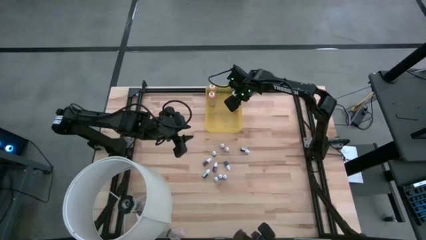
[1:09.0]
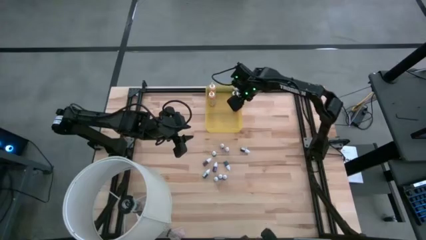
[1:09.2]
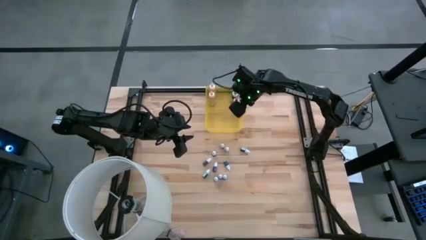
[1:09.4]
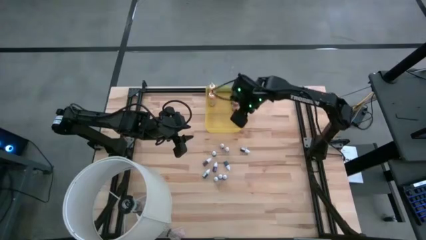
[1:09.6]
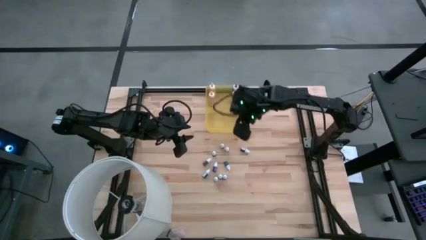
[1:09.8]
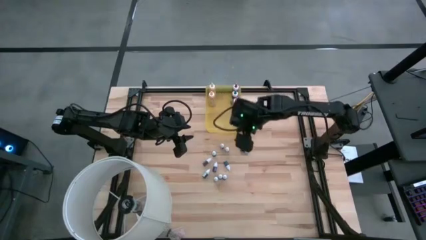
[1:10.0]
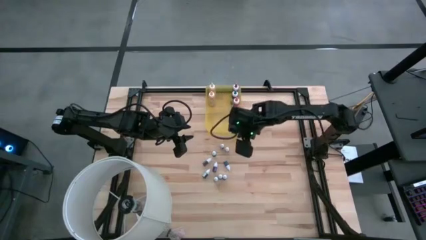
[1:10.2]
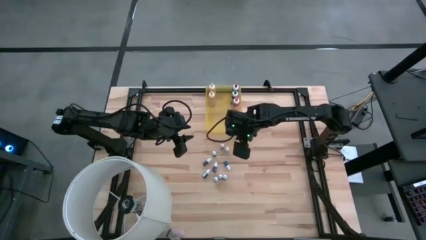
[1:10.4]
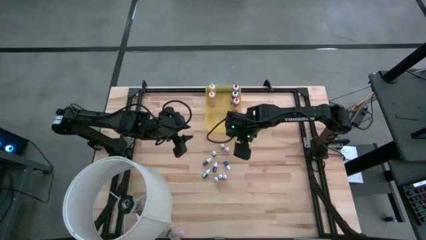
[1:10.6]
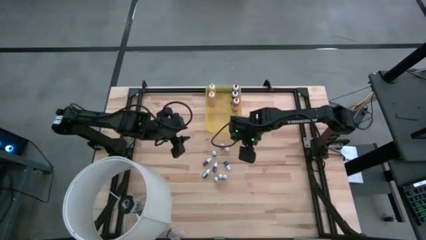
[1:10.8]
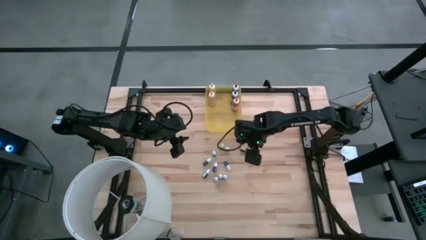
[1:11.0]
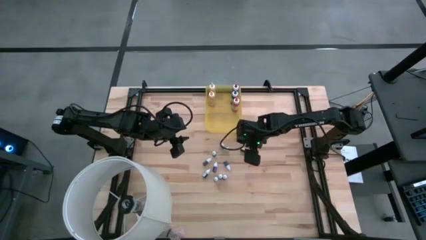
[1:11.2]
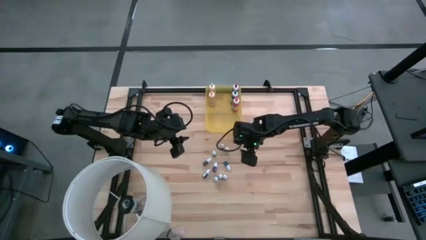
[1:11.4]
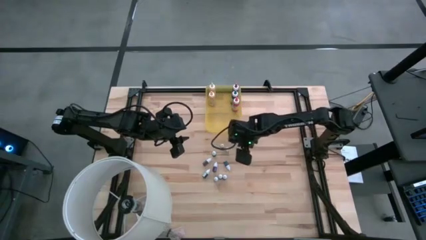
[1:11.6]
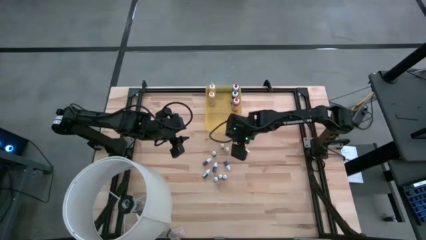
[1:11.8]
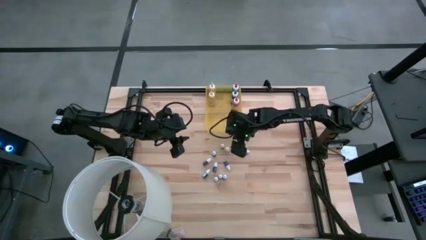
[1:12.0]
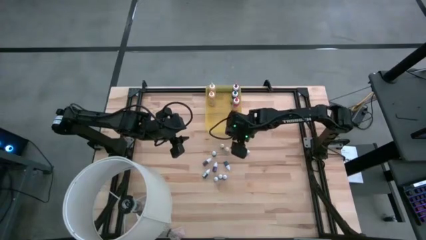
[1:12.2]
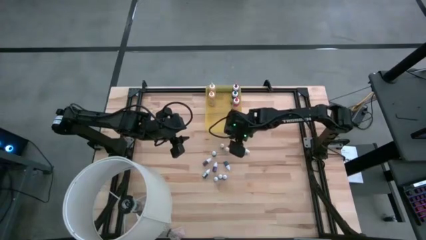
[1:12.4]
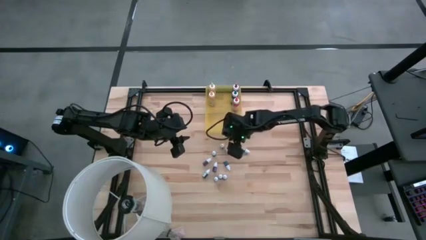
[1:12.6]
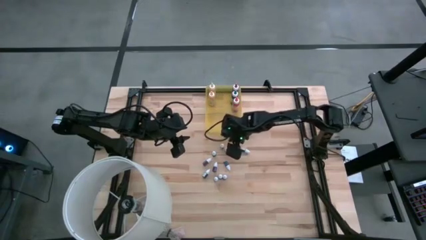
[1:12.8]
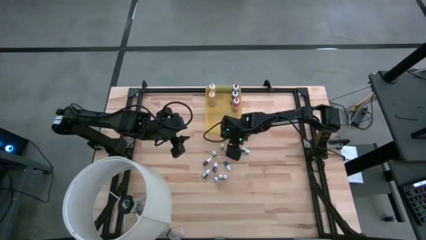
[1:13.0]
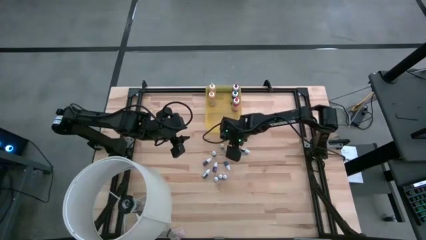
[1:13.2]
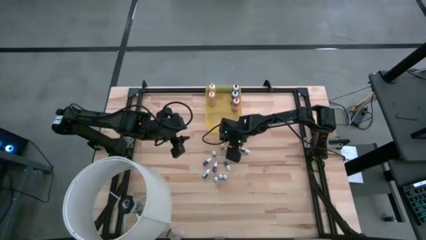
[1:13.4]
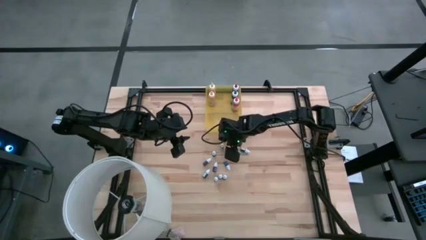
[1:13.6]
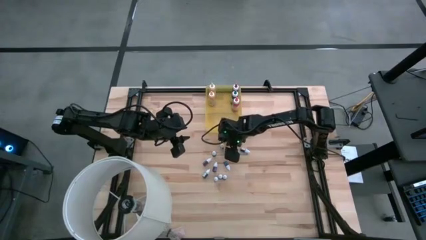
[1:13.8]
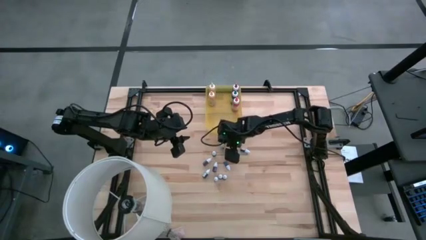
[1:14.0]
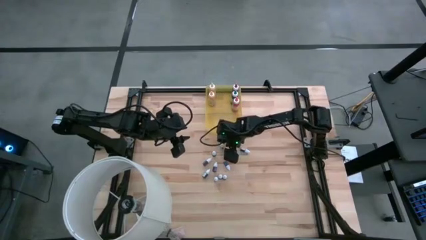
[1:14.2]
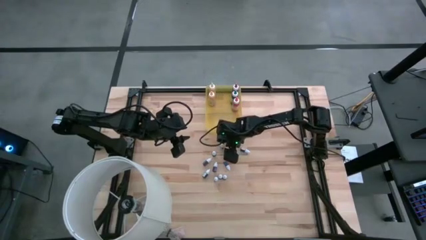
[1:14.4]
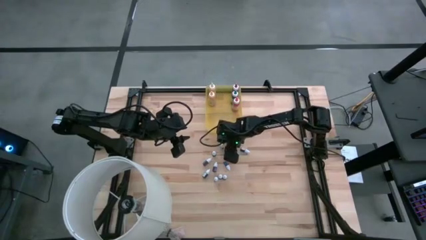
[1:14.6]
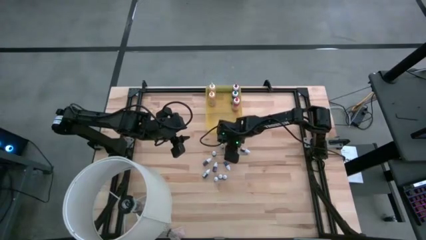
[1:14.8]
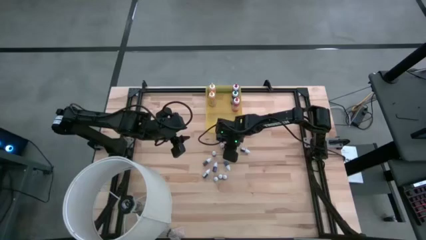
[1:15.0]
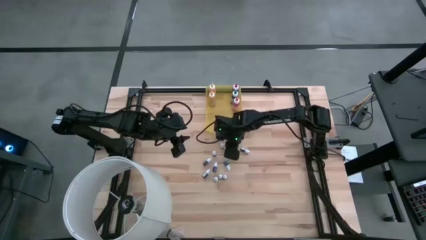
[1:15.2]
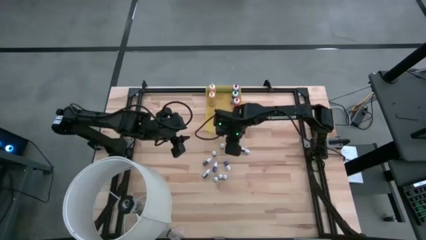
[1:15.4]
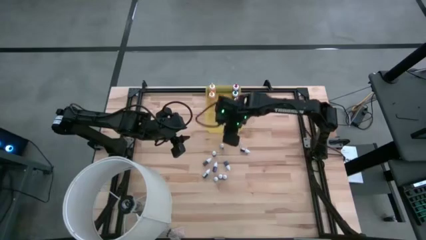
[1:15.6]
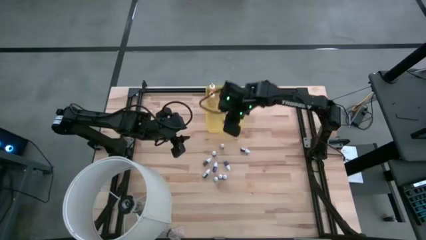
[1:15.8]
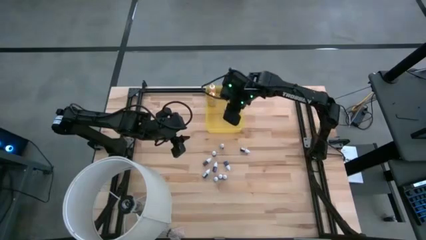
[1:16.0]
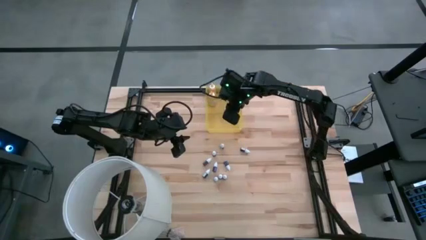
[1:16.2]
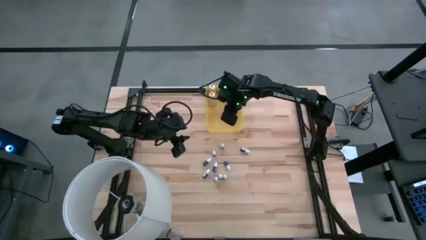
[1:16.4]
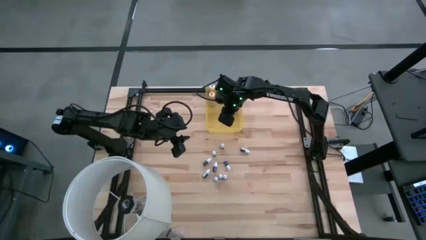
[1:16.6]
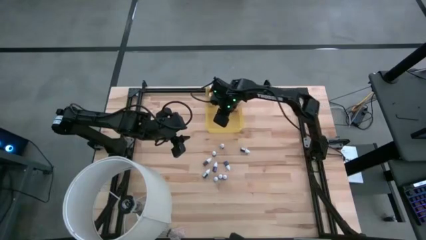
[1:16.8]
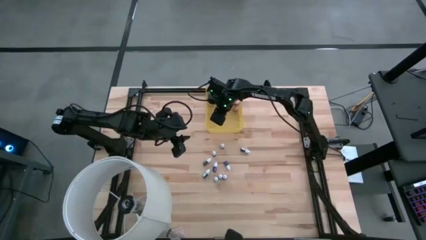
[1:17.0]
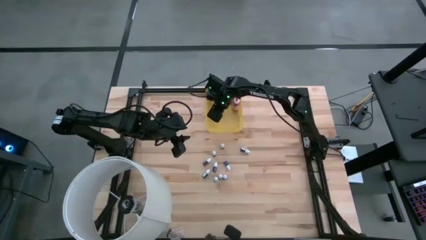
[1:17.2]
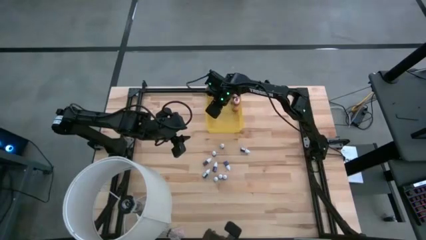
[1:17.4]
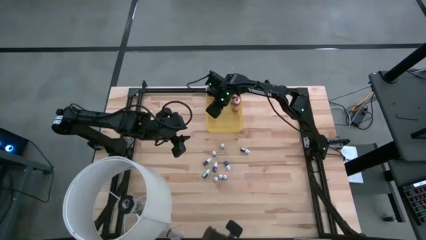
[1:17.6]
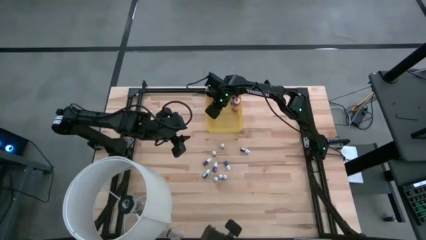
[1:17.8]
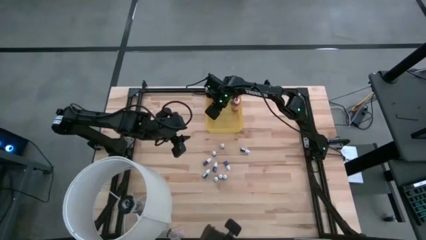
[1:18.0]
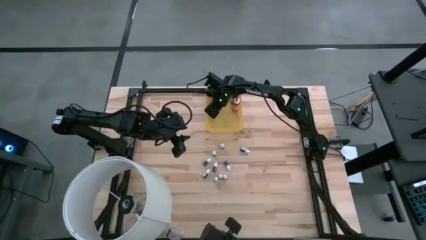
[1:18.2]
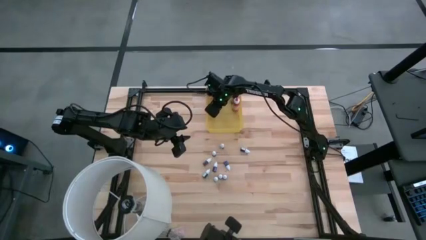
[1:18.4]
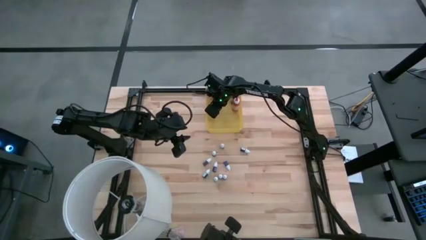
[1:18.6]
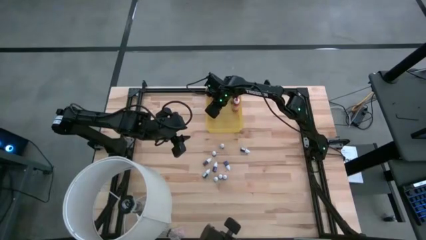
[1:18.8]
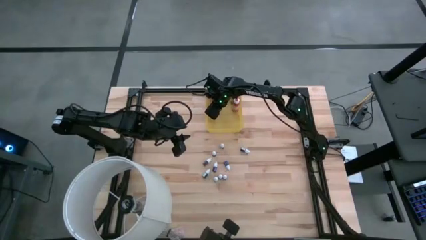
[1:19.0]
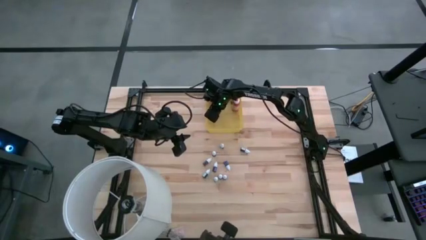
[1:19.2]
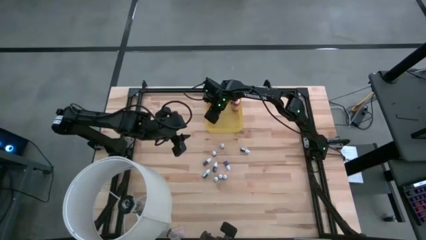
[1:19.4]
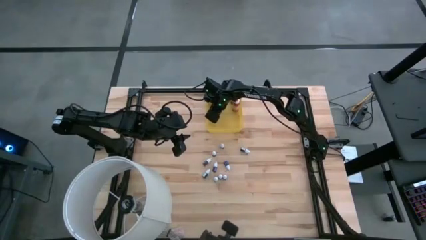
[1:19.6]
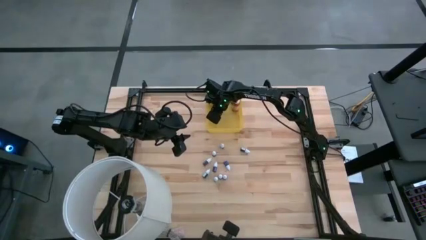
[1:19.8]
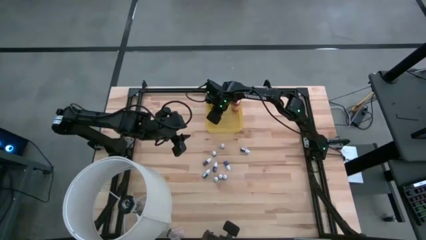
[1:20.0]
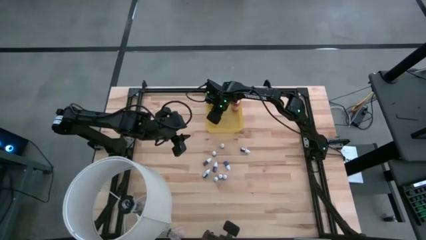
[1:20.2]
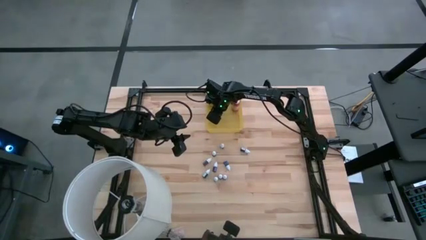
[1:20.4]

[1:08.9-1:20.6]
Task: Pick & Place food coloring
Put the top small red food coloring bottle into the yellow bin
